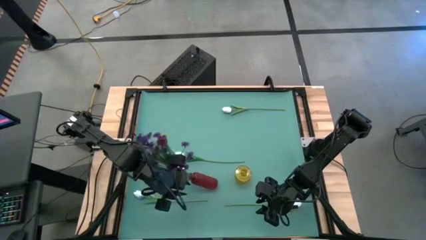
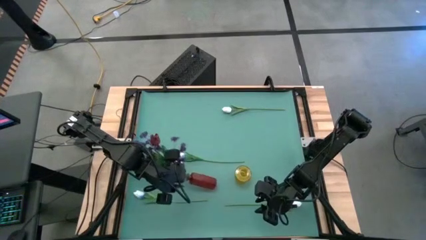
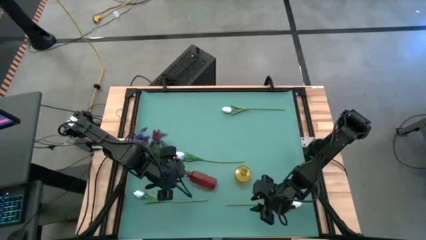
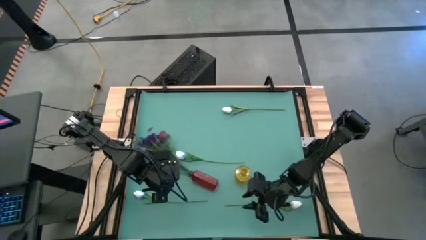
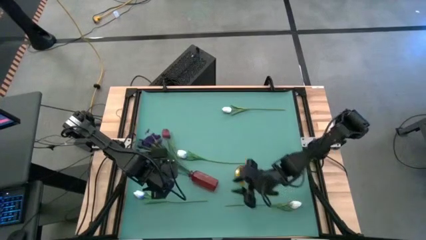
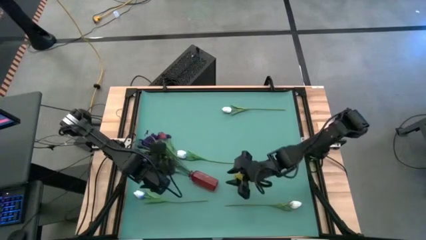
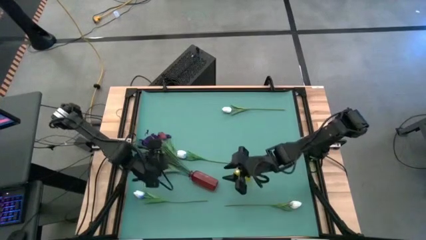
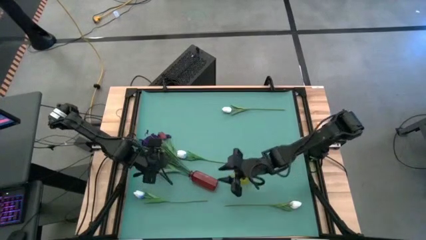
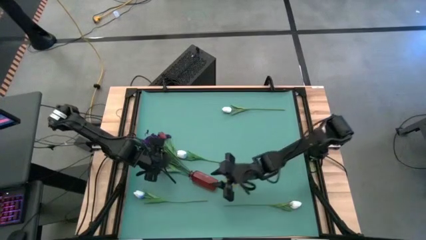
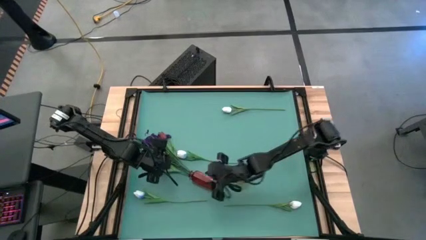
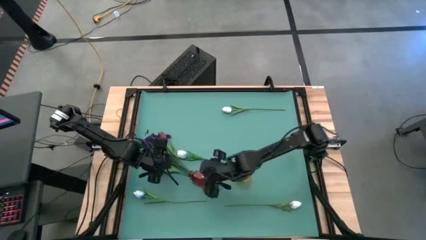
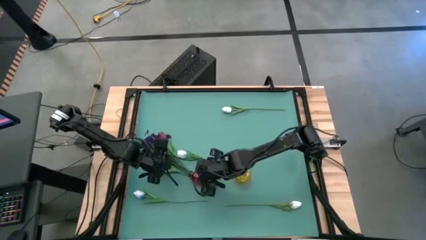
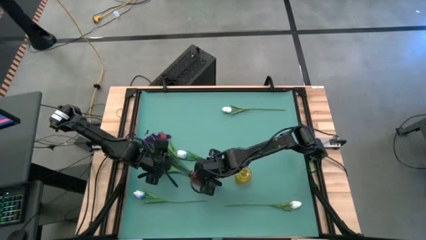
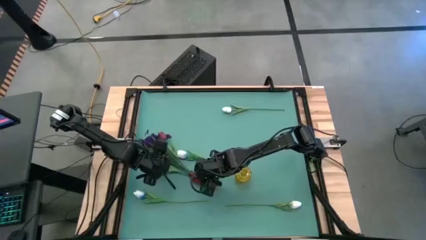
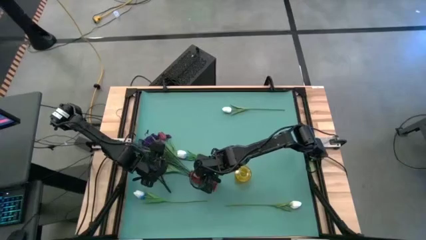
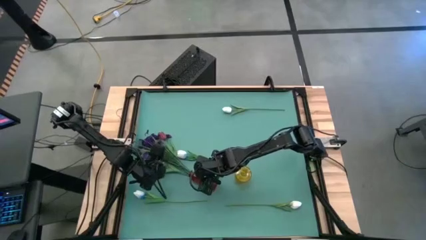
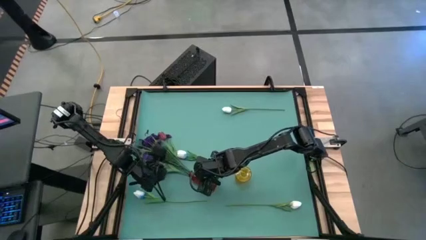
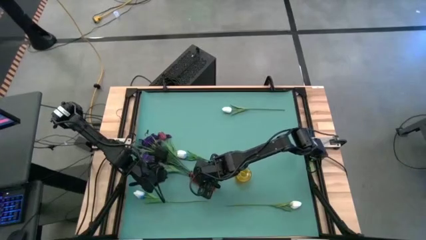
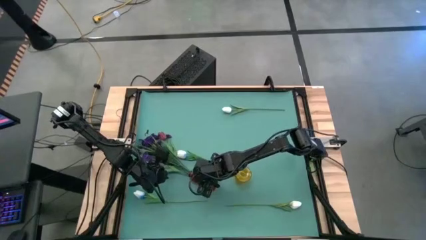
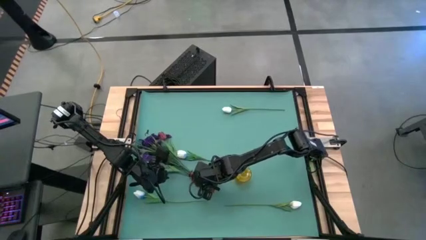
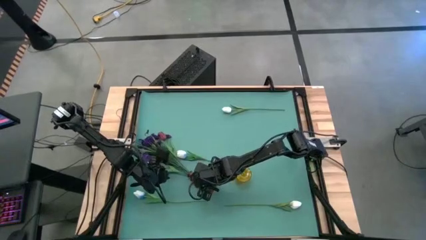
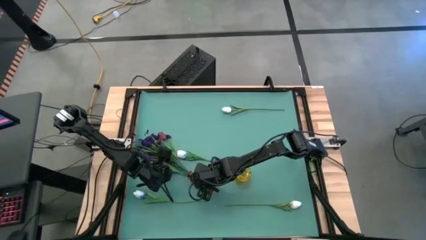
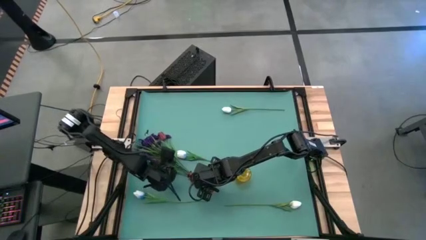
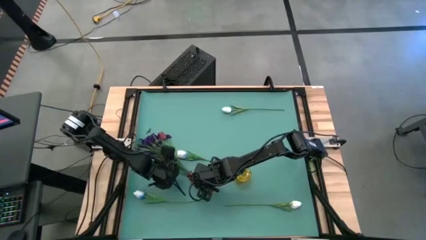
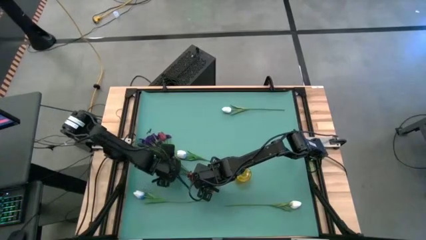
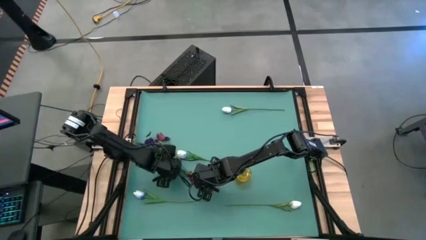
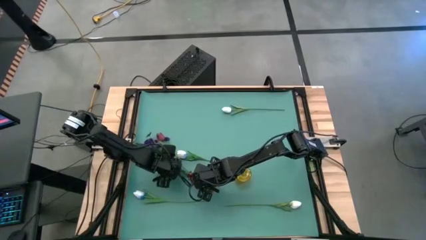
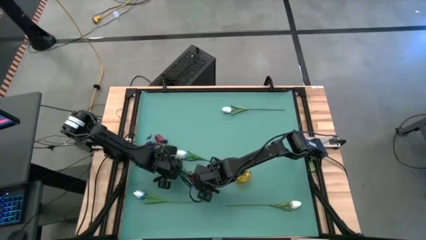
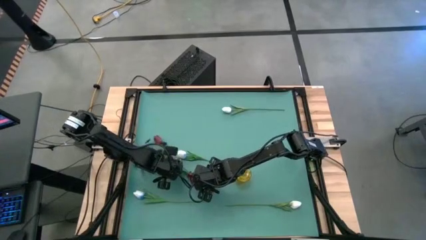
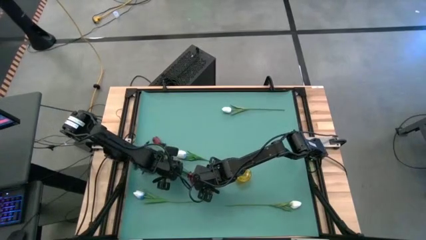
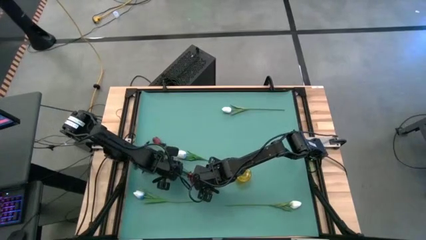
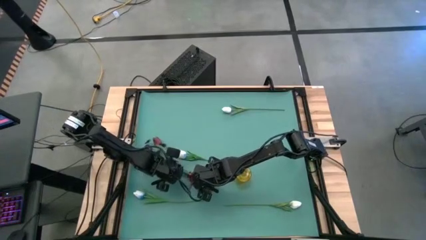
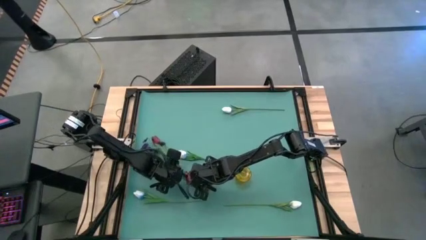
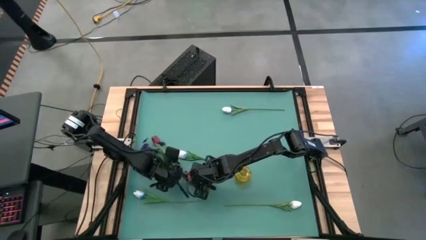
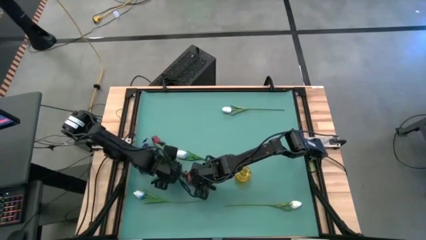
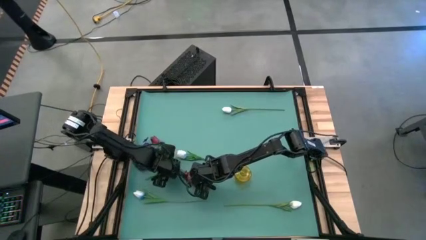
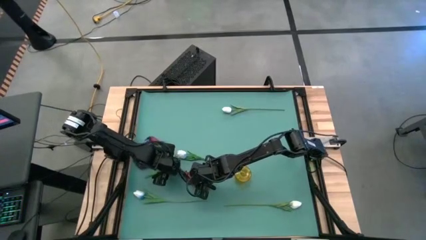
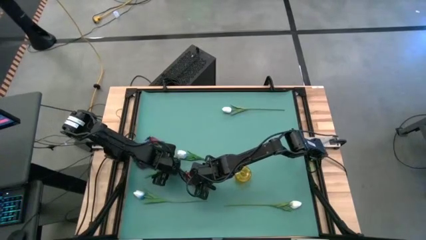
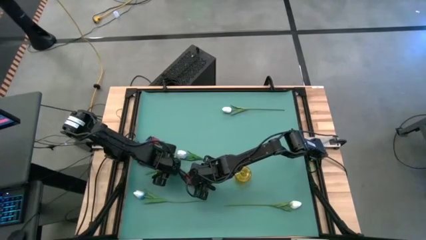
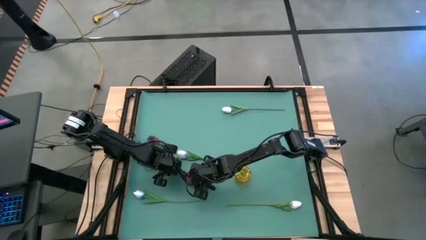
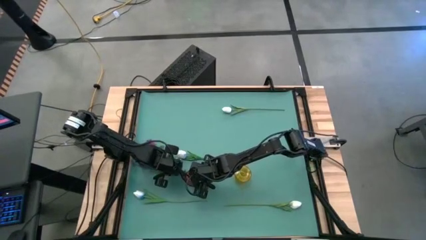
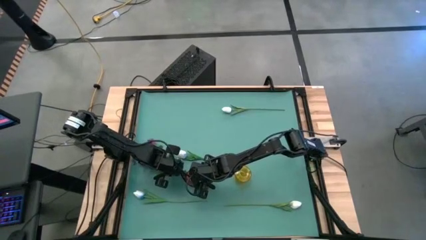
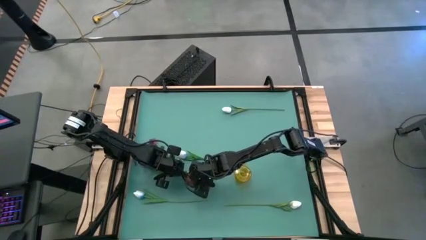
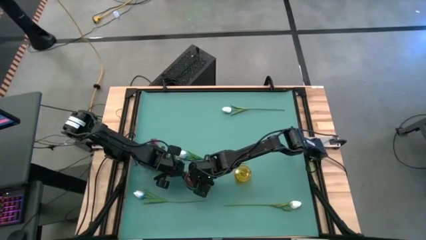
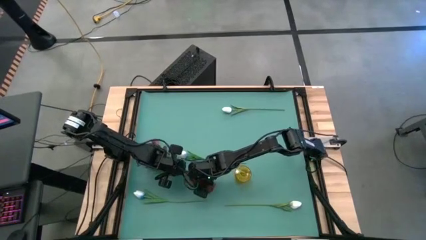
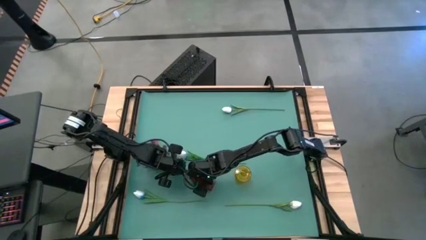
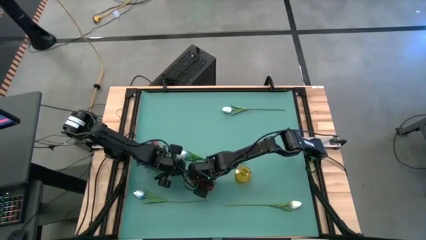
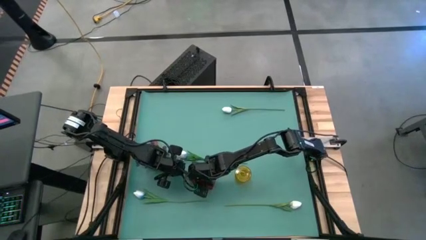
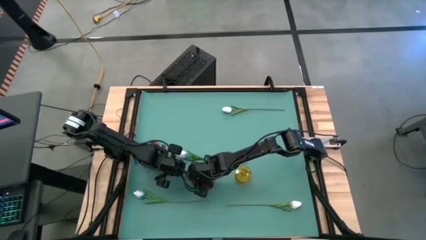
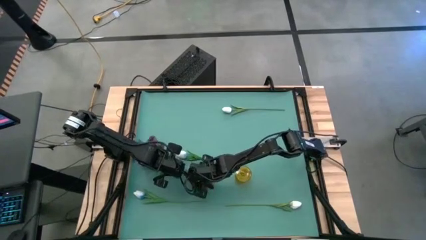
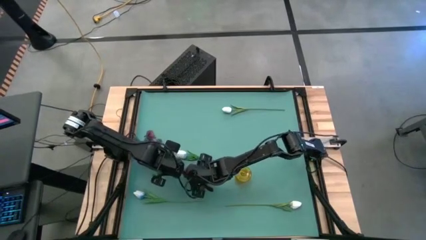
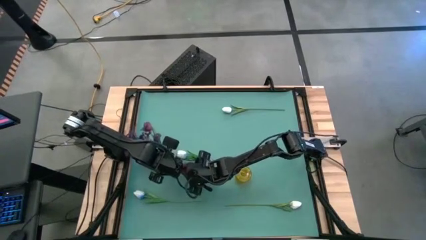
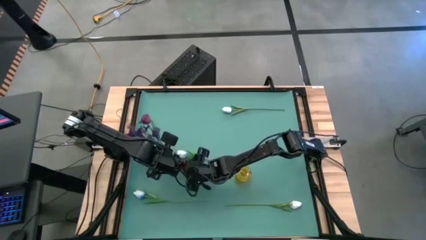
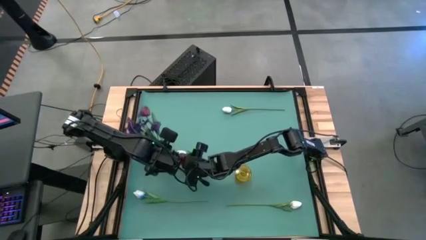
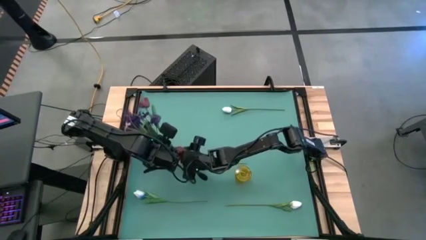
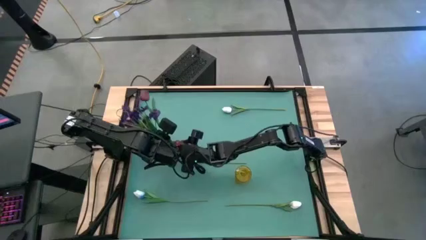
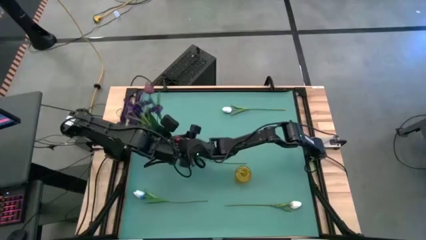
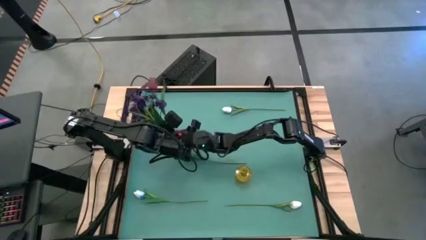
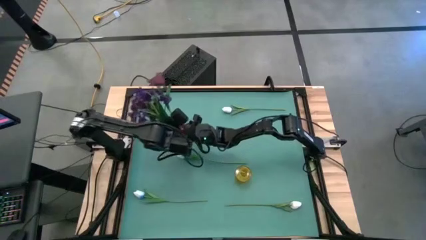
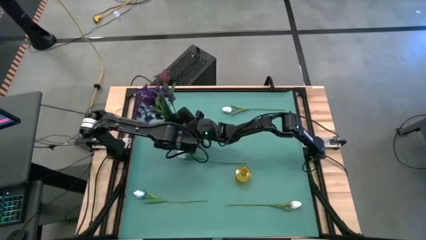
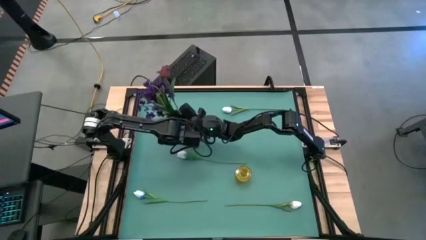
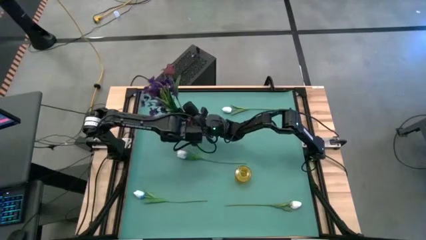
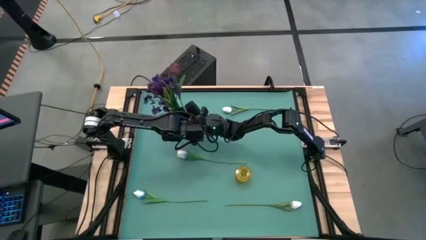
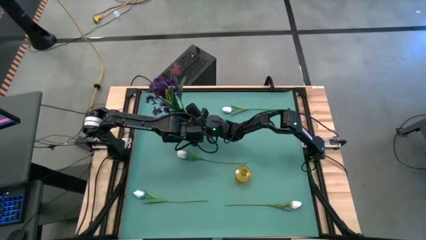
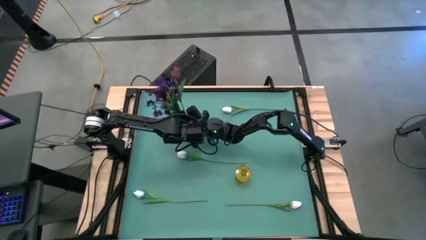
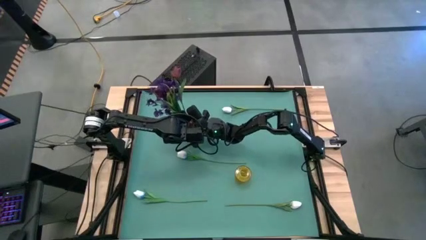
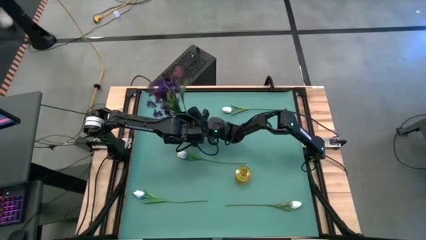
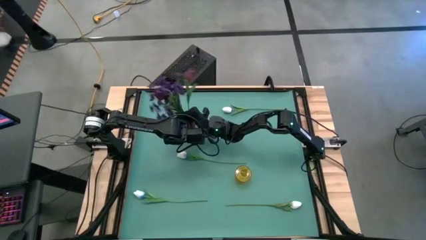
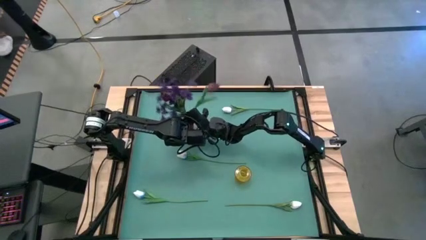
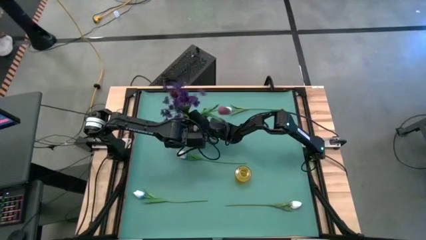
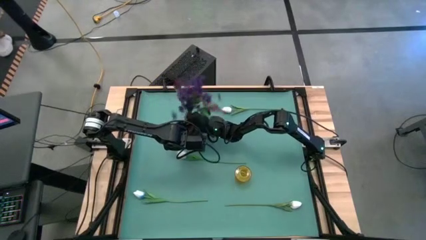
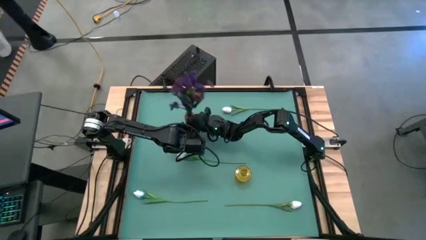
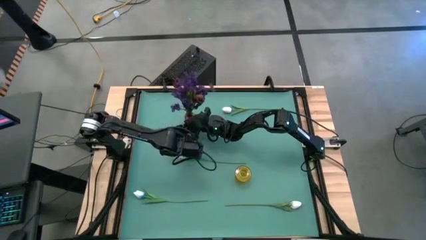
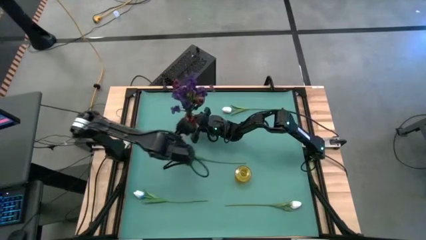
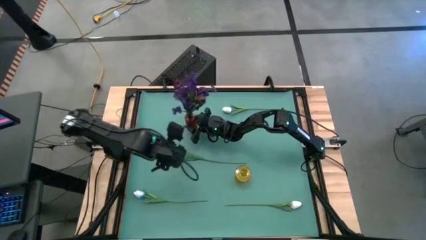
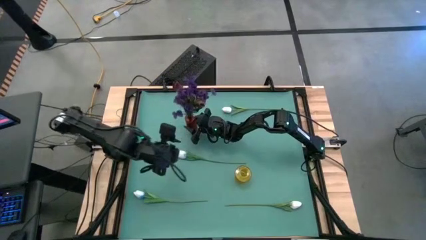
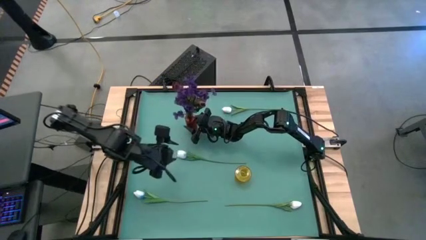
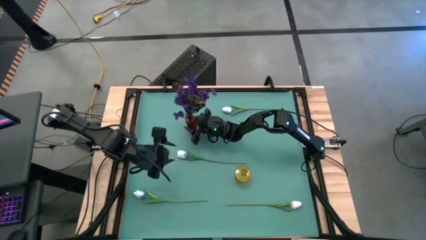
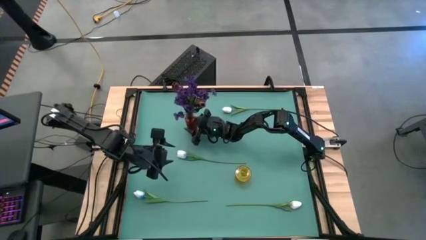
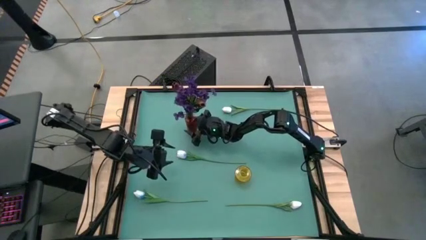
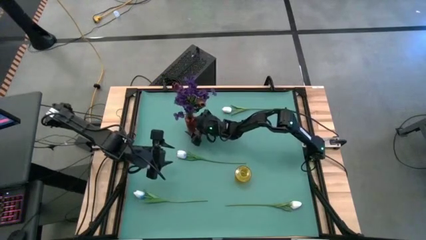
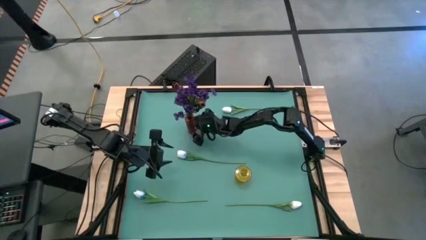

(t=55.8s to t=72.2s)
Task: Sort flowers into vase by color
Adjust the red flower vase
